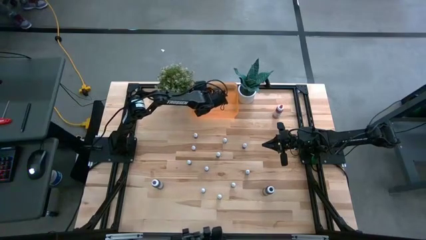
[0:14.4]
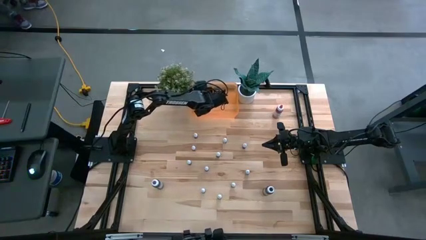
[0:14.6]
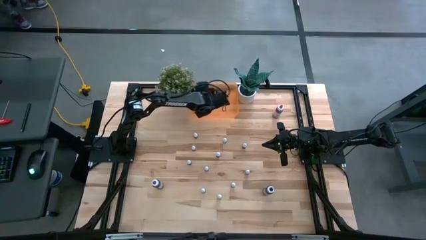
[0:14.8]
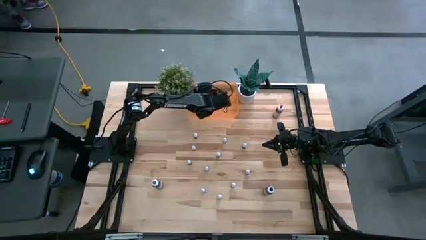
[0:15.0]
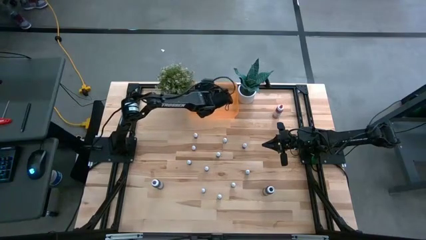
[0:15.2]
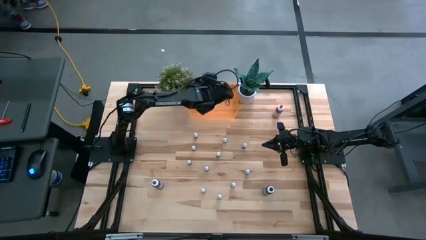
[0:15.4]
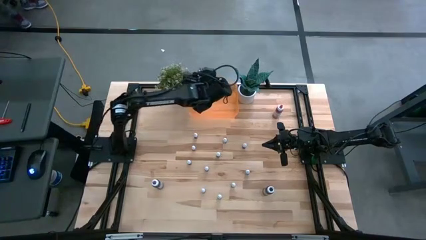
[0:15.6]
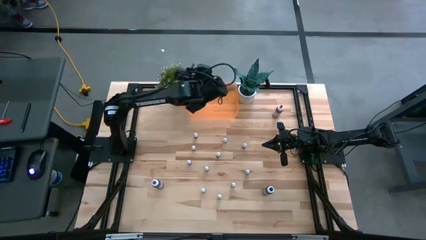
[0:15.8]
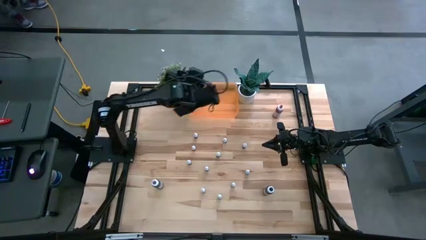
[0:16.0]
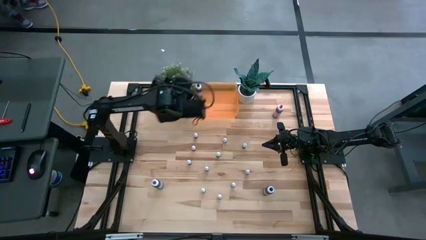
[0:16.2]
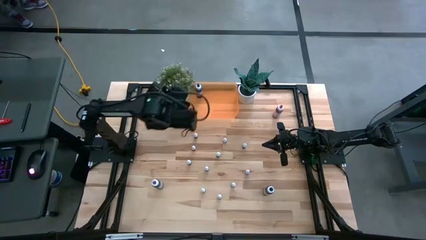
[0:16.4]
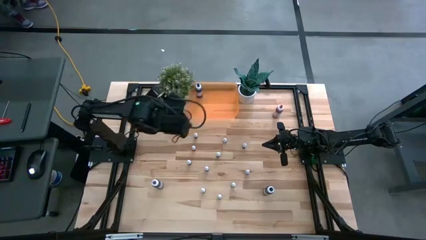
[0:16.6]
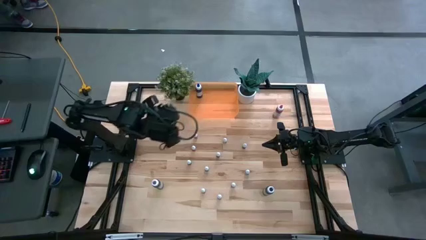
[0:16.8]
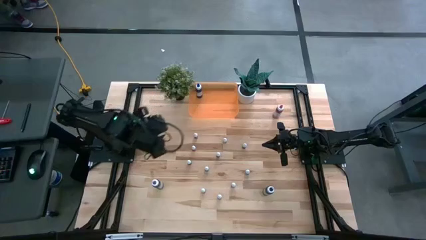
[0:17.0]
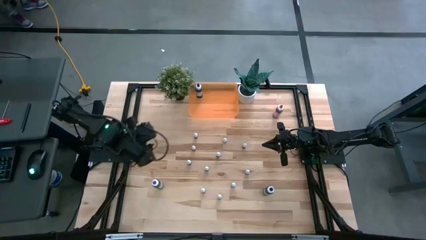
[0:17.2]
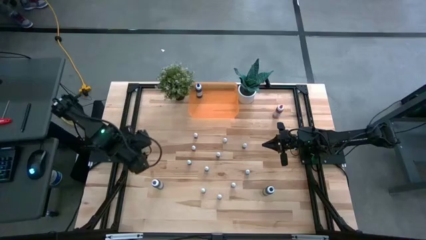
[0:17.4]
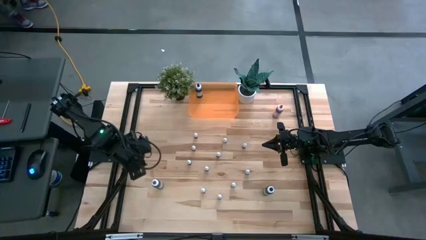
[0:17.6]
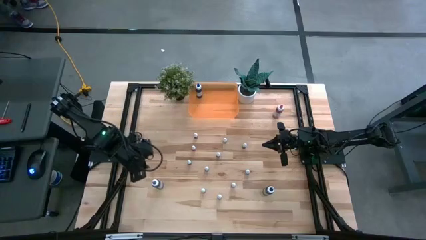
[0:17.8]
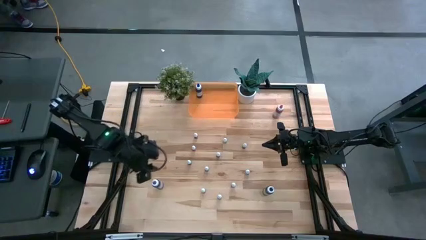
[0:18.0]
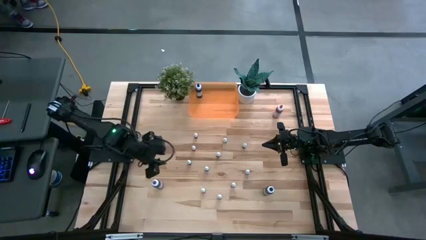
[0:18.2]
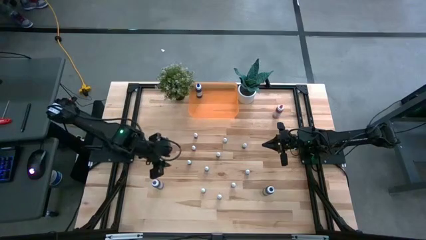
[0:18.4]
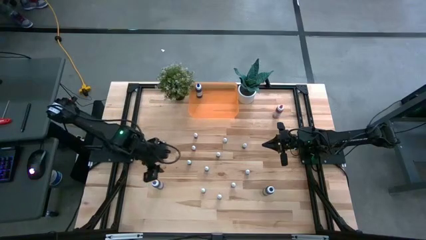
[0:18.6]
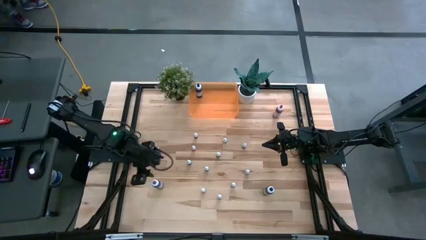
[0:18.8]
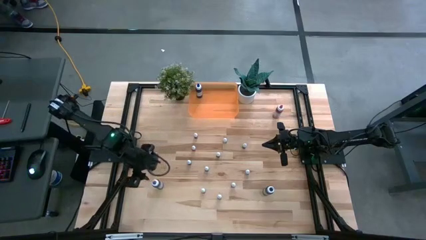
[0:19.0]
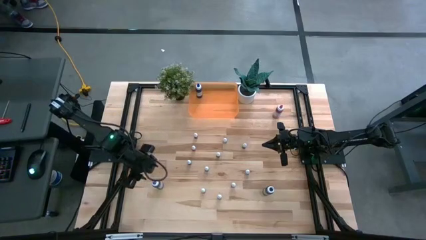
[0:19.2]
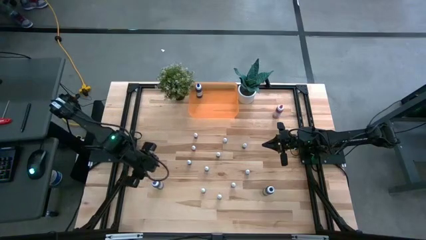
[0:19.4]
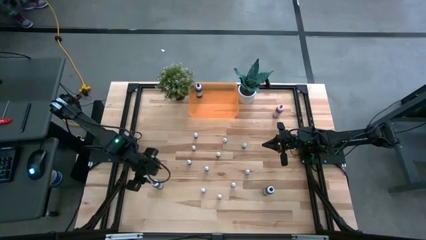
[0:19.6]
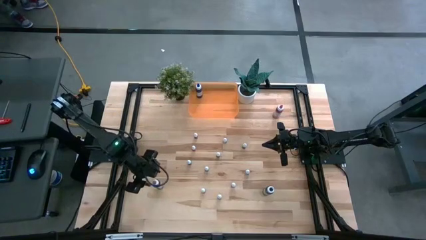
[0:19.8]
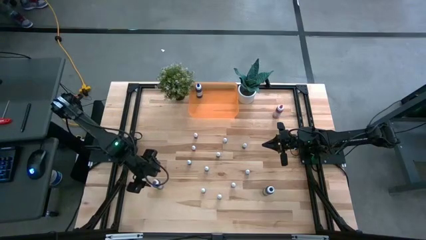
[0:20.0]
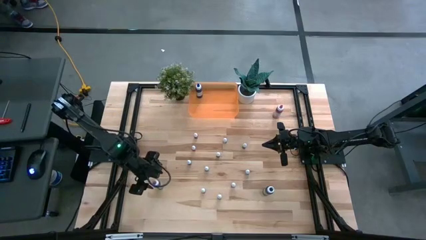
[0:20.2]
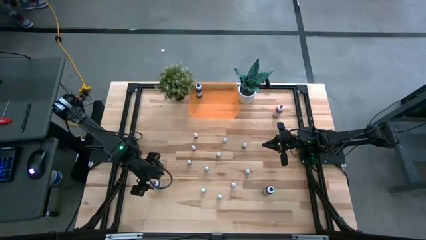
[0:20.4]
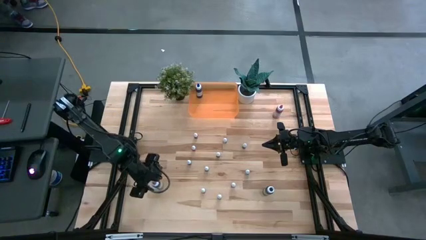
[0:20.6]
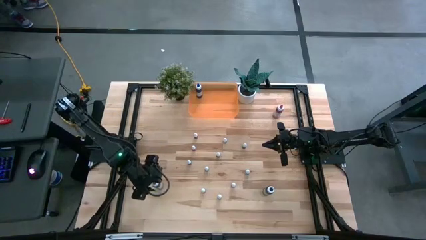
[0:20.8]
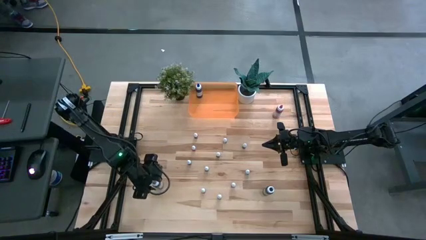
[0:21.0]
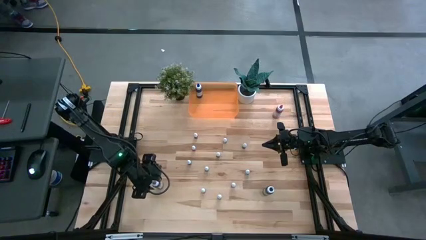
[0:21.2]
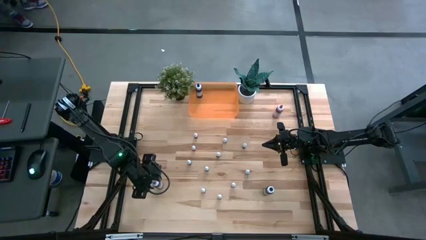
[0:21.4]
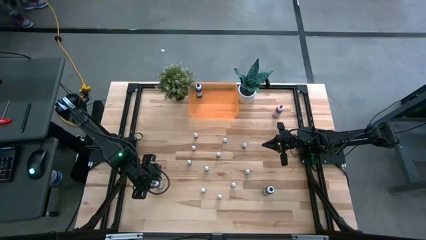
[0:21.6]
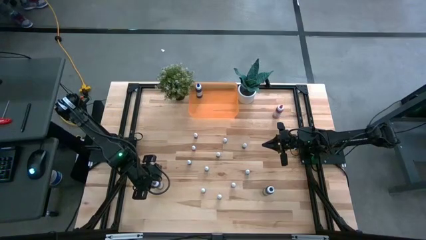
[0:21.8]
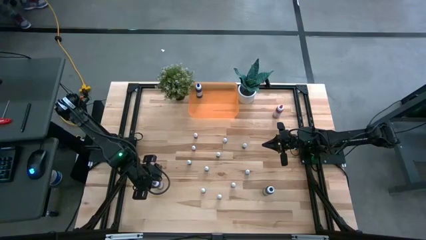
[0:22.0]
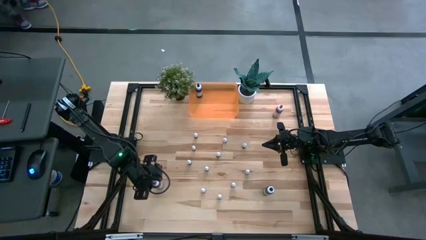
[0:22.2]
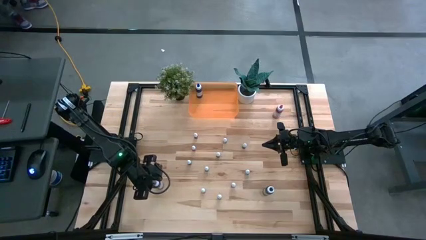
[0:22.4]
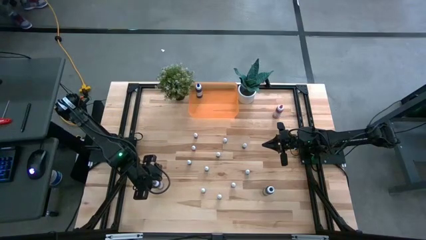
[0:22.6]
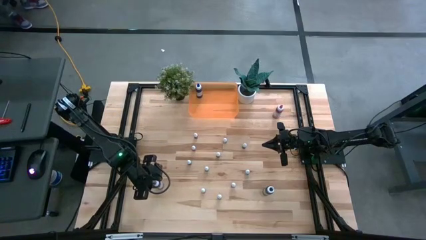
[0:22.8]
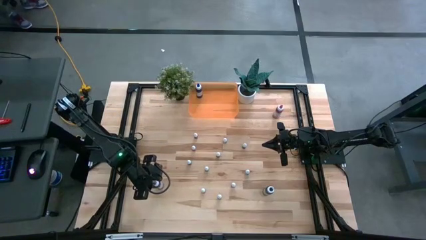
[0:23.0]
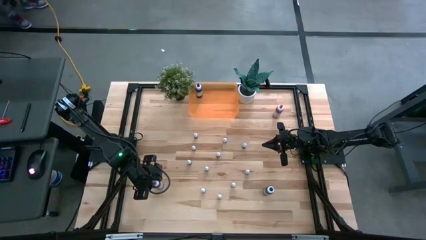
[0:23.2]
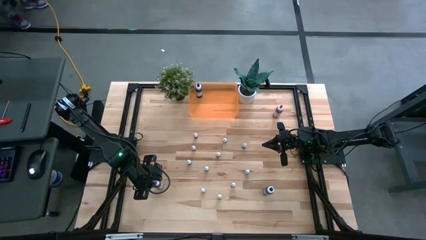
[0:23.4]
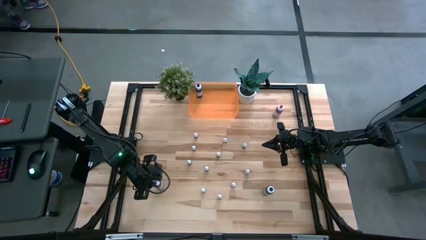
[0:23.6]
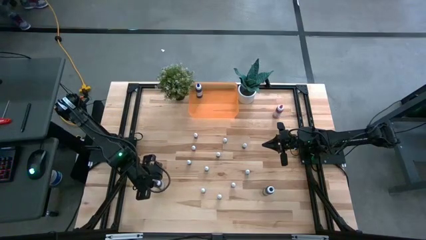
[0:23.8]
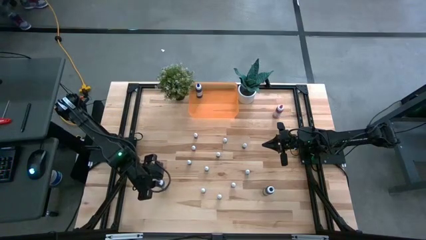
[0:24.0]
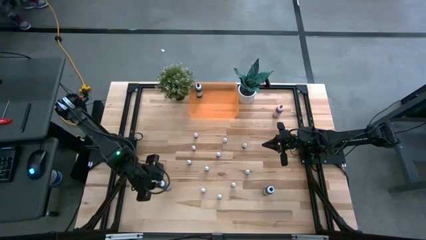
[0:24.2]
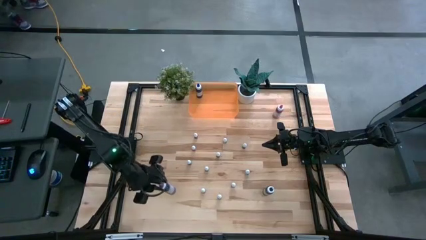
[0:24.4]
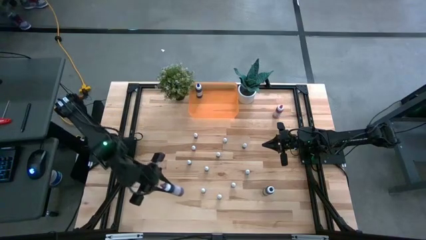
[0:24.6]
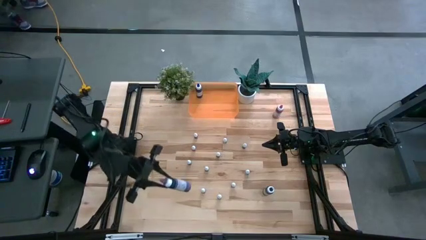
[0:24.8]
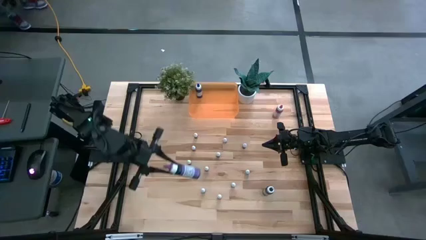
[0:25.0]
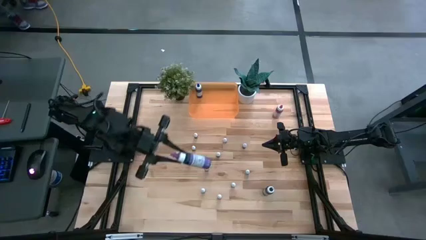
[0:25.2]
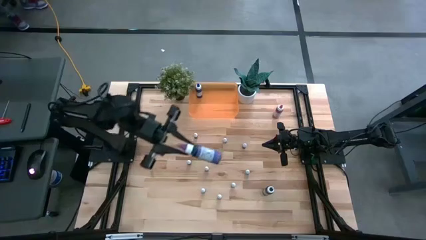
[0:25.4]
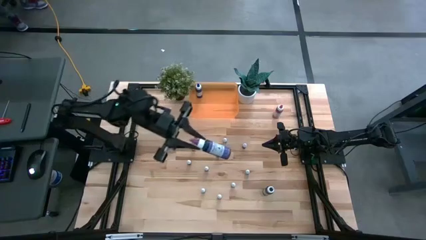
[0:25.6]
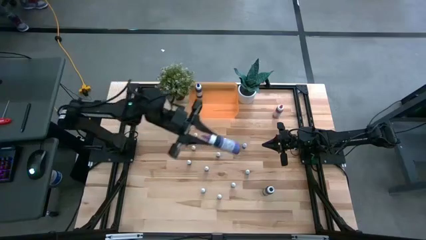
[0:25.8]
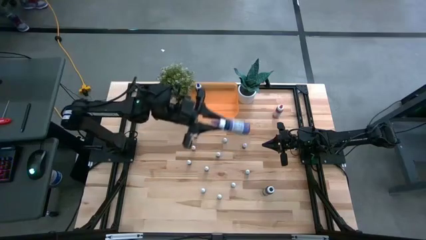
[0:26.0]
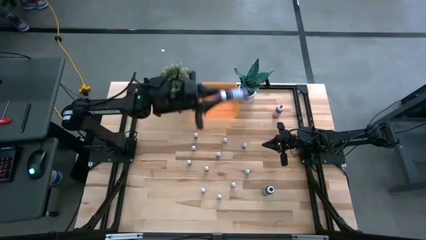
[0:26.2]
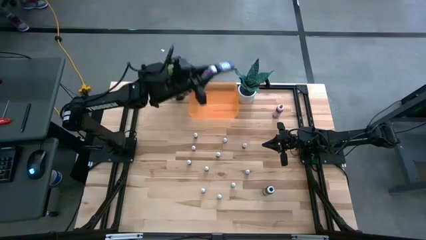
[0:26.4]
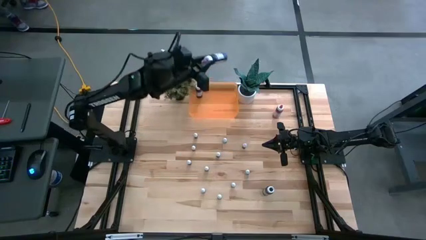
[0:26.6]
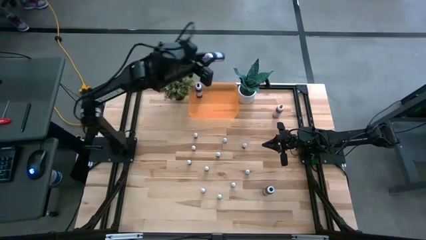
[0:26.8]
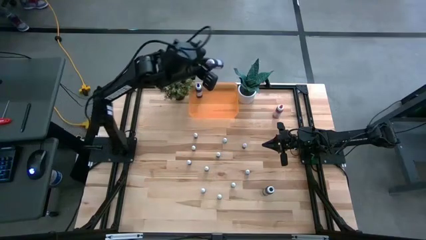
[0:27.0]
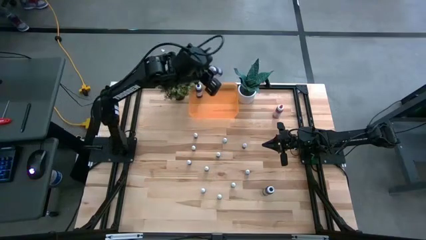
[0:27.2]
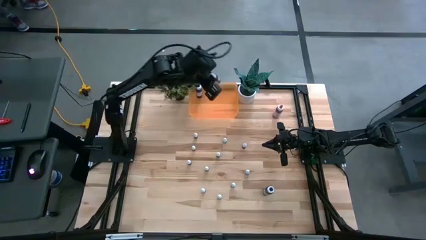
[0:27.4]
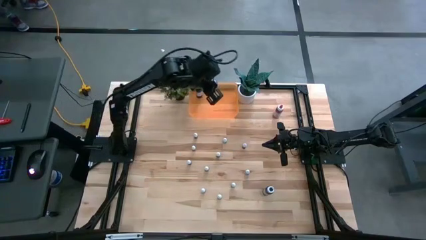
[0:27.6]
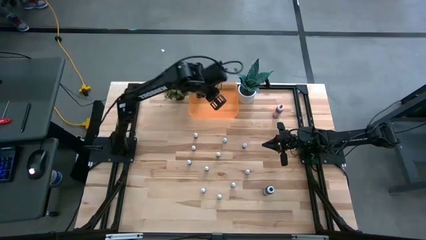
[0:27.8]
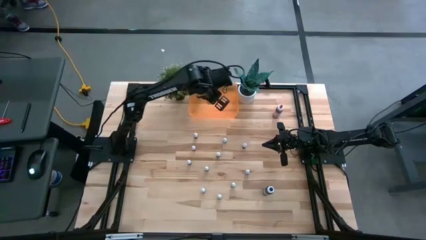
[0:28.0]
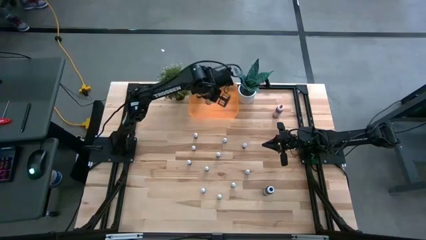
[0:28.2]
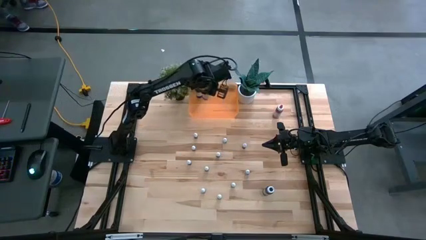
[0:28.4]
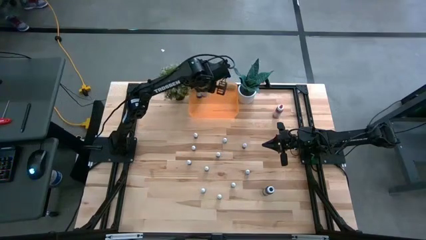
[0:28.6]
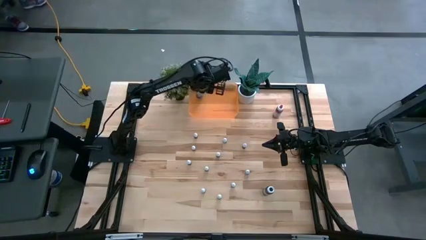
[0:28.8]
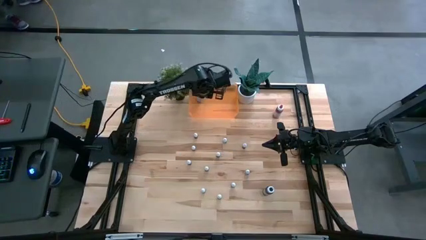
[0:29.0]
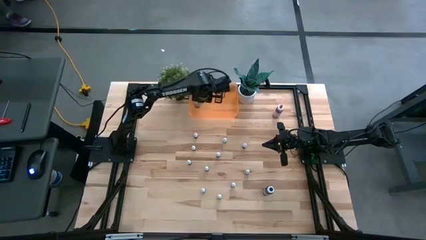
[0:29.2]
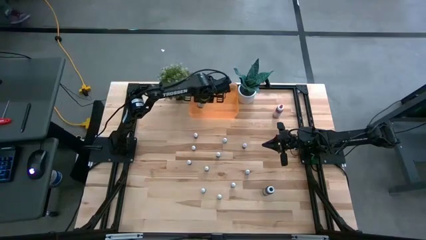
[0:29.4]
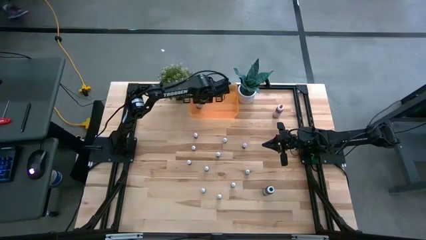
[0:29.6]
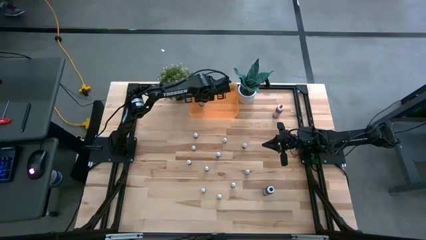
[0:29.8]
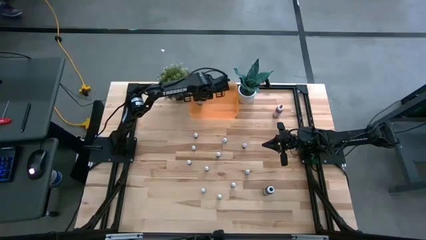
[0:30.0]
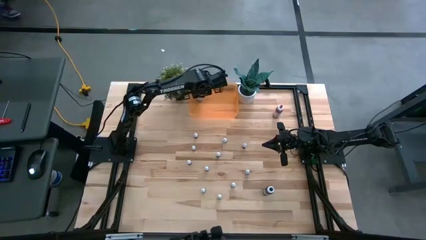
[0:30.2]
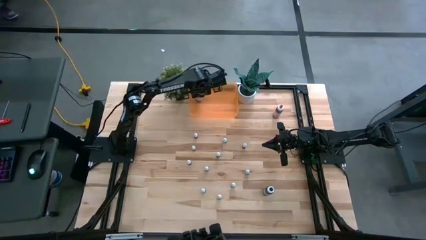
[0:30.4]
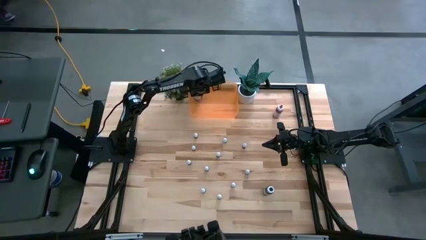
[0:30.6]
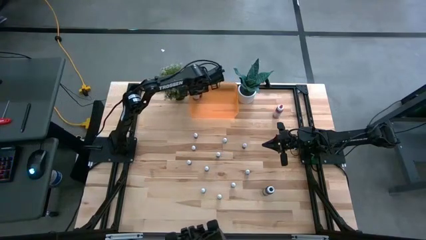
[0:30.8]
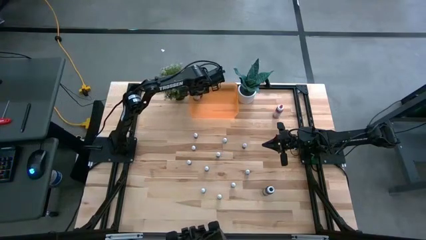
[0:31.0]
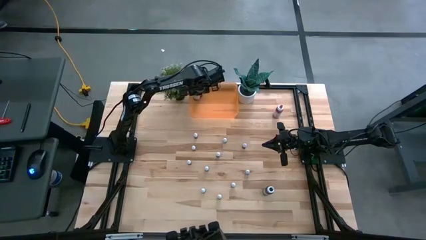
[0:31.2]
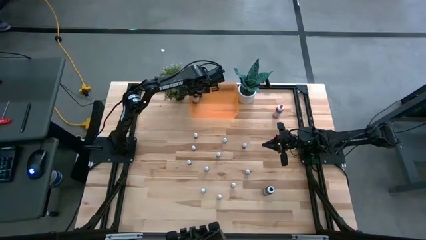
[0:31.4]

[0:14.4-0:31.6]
Task: Pick & Place food coloring
Put the large violet bottle into the bin
